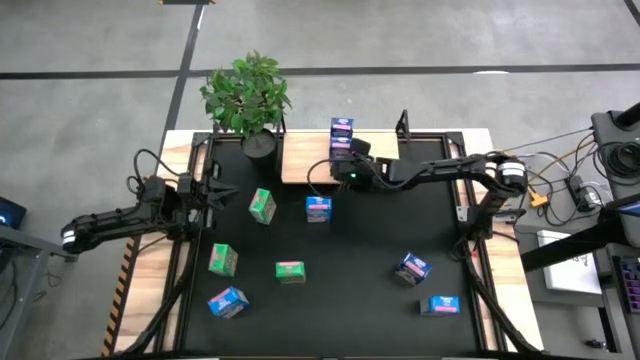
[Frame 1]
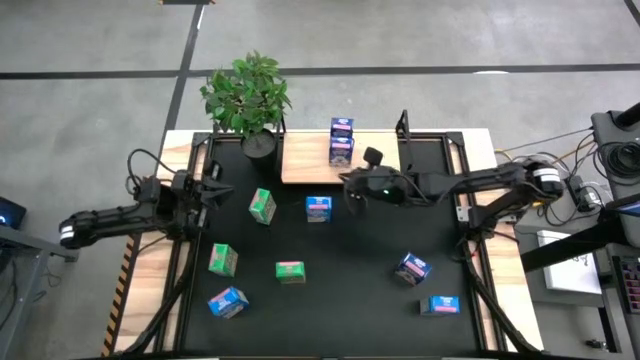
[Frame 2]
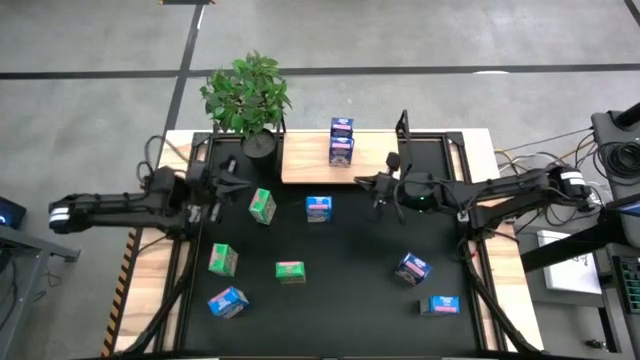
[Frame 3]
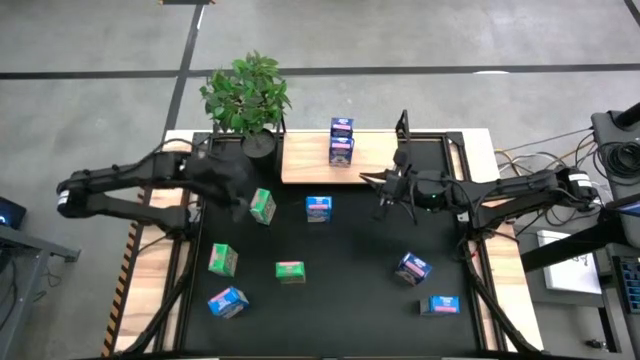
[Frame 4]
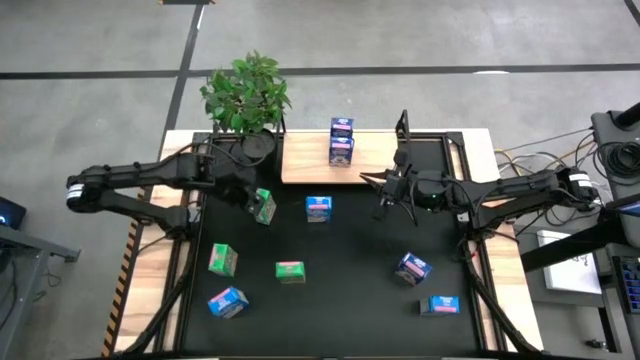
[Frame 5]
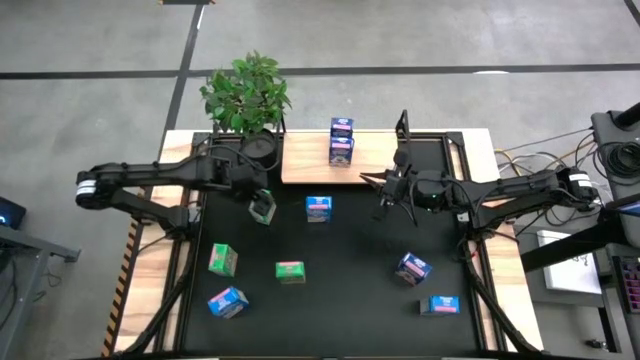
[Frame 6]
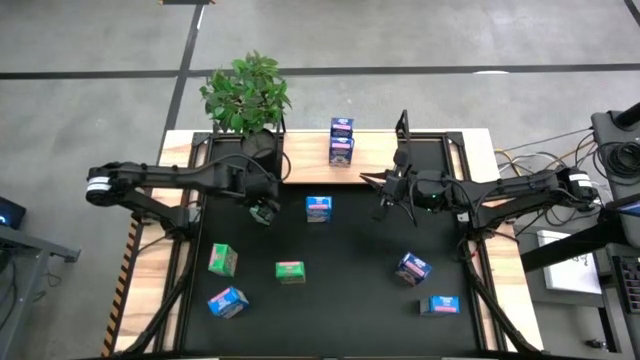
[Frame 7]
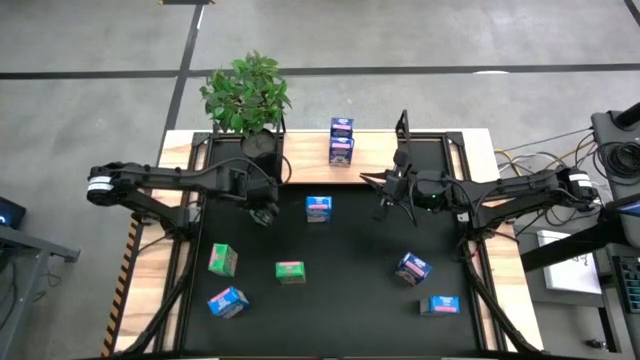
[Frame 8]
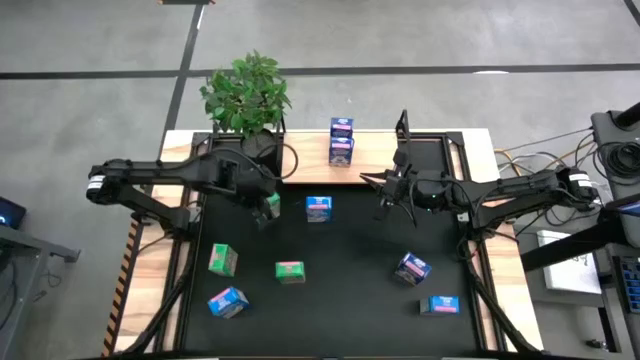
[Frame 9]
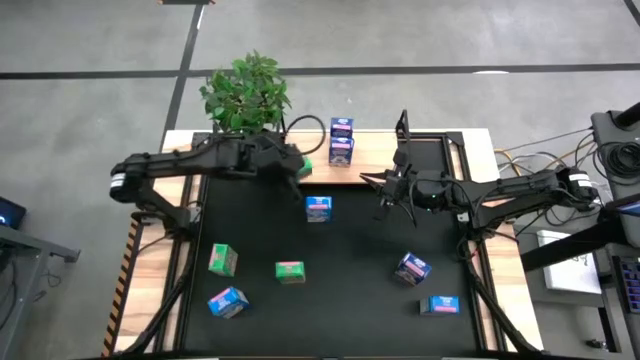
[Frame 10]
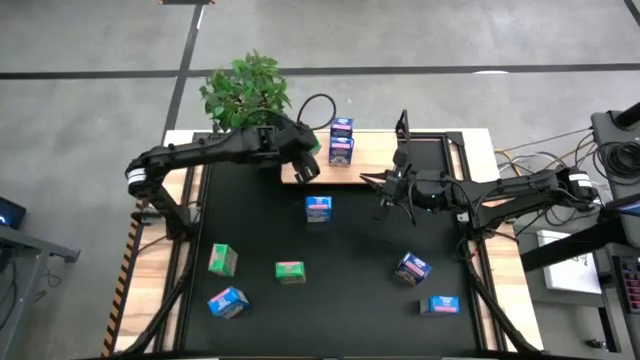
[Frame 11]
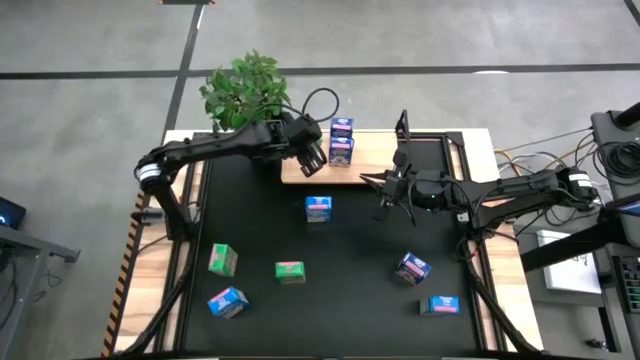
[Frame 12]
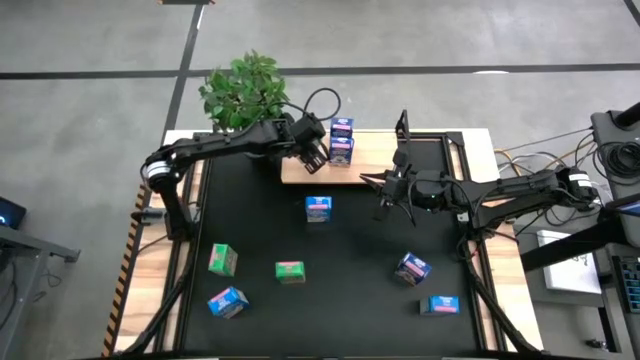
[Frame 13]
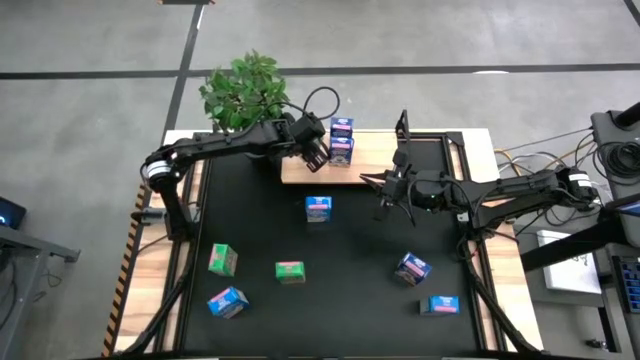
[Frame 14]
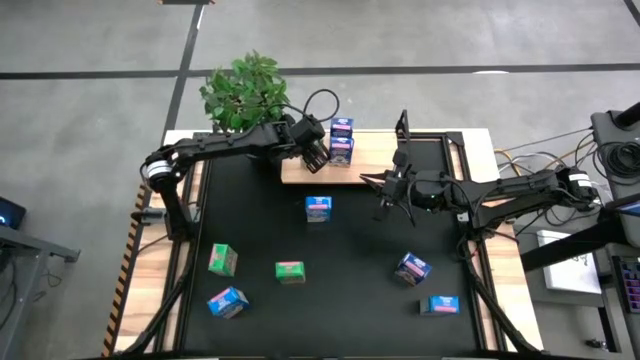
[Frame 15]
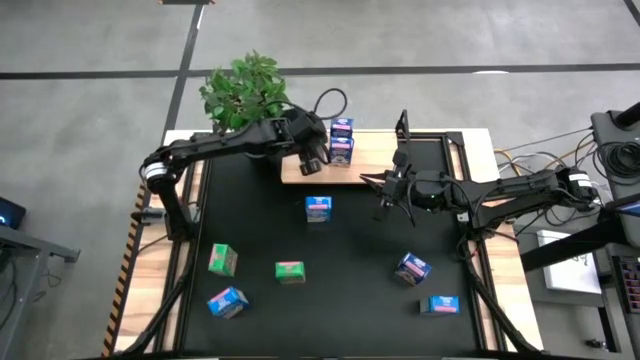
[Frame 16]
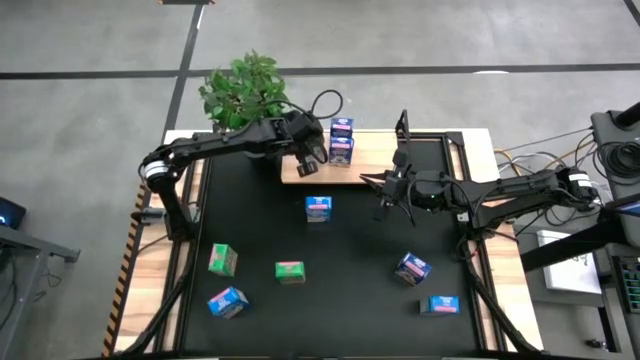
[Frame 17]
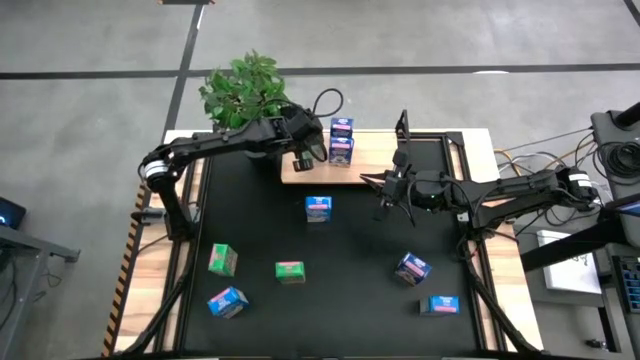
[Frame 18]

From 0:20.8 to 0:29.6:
Task: Stack cereal on shelf
Put the top green cereal box on the shelf

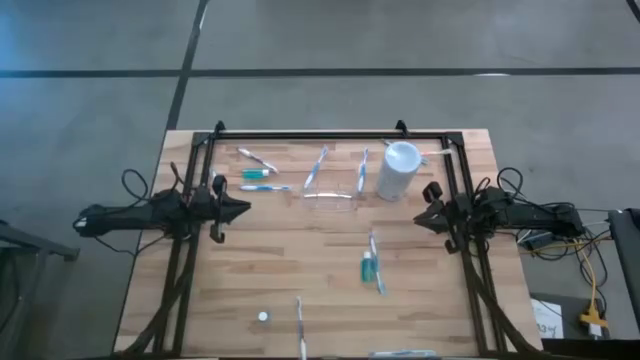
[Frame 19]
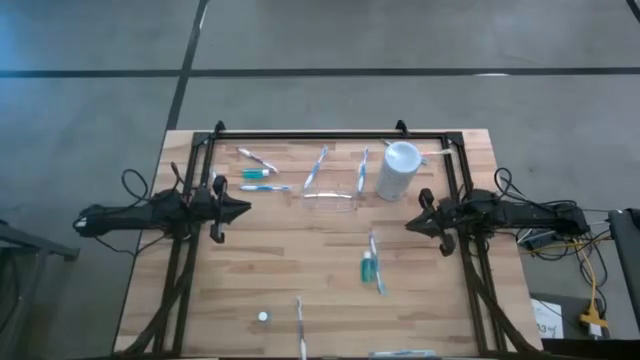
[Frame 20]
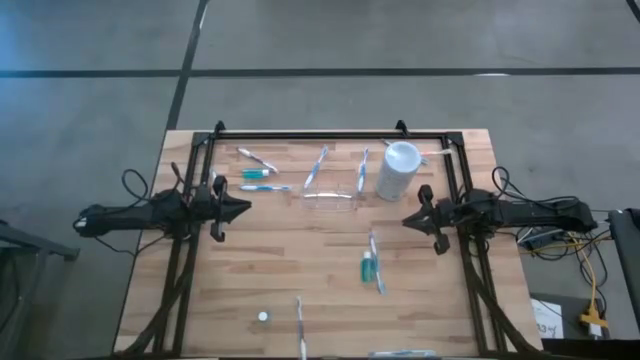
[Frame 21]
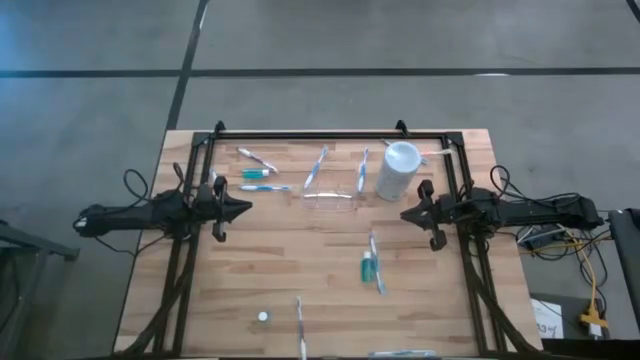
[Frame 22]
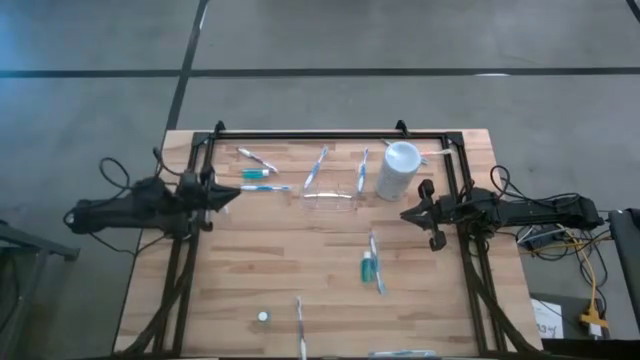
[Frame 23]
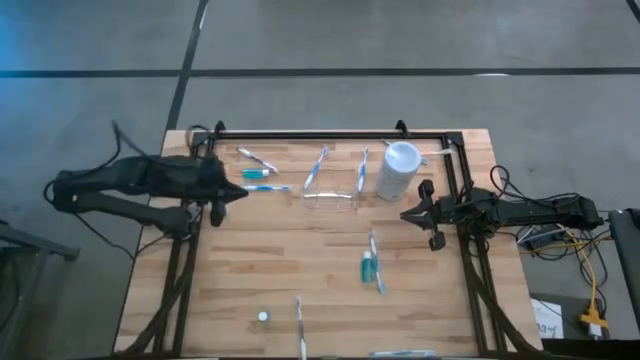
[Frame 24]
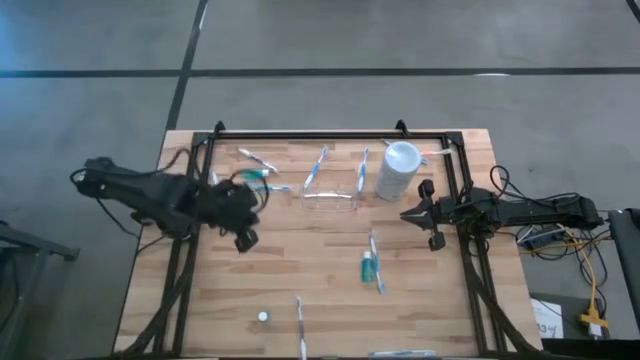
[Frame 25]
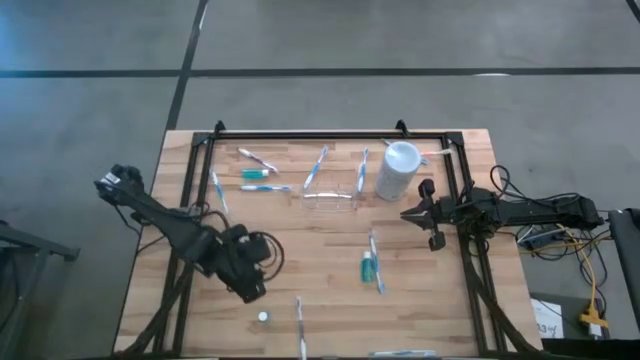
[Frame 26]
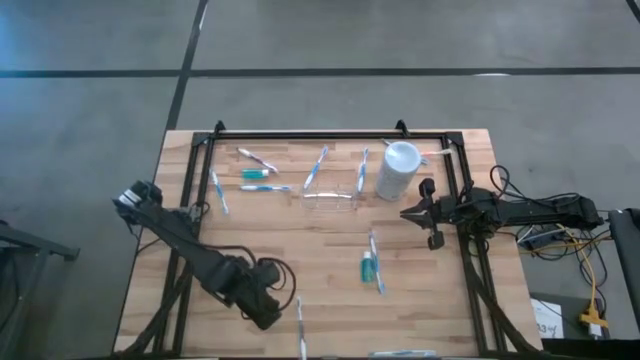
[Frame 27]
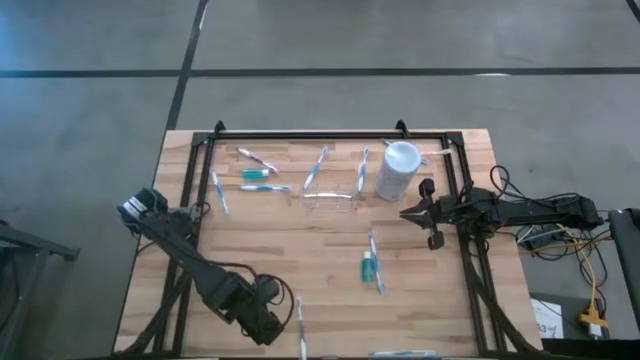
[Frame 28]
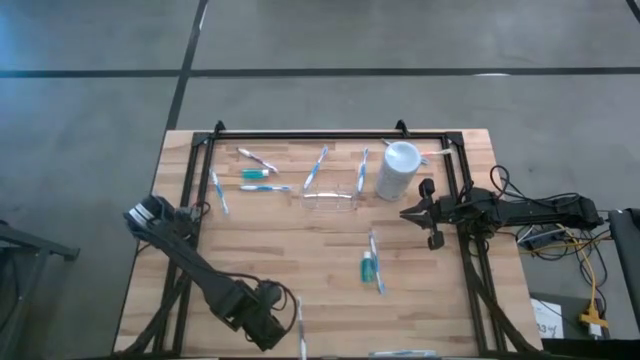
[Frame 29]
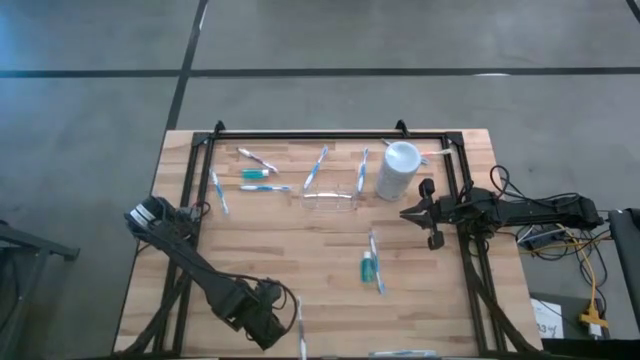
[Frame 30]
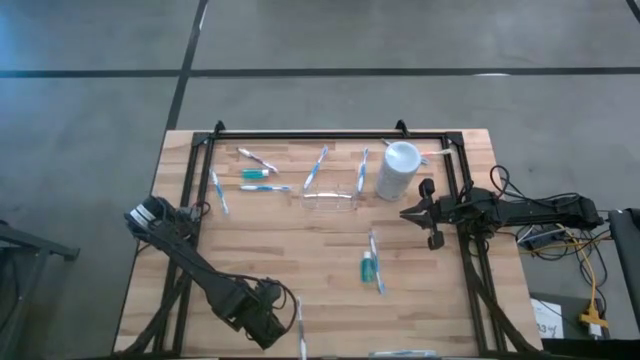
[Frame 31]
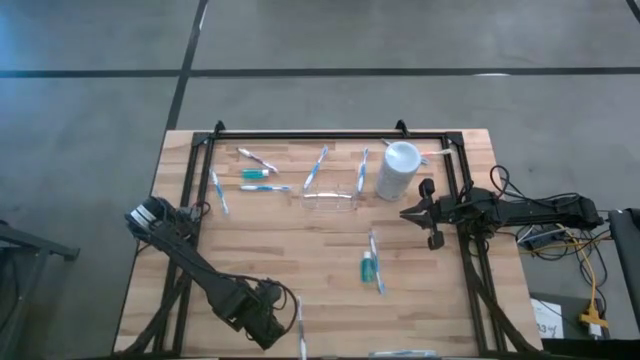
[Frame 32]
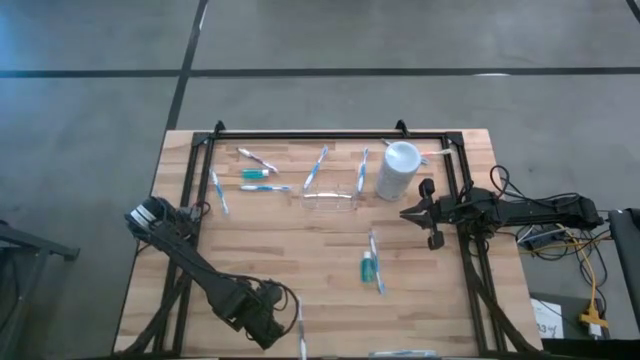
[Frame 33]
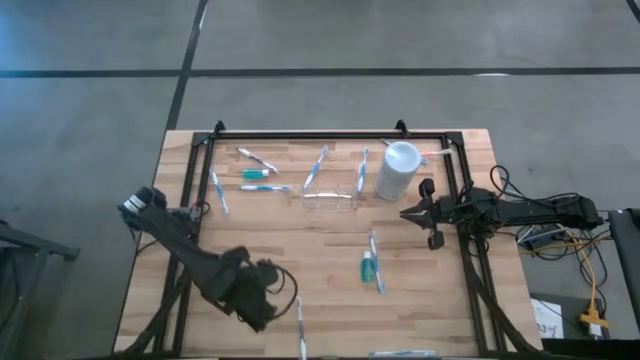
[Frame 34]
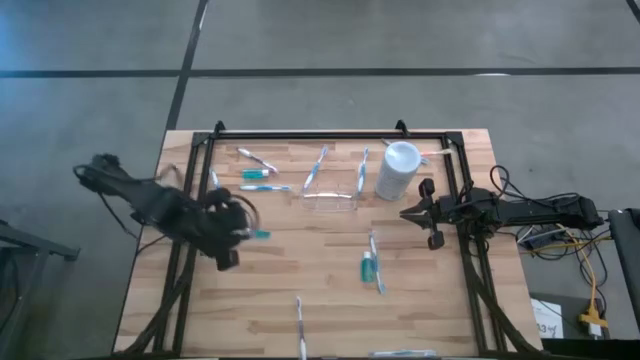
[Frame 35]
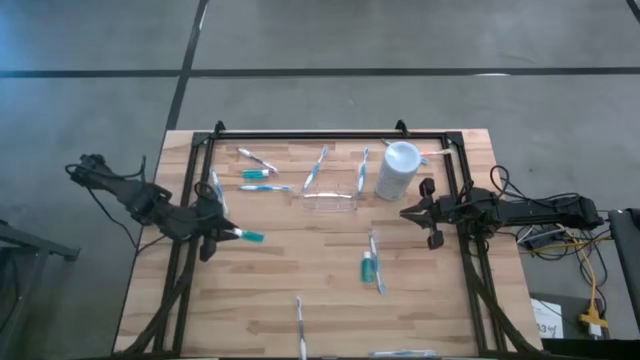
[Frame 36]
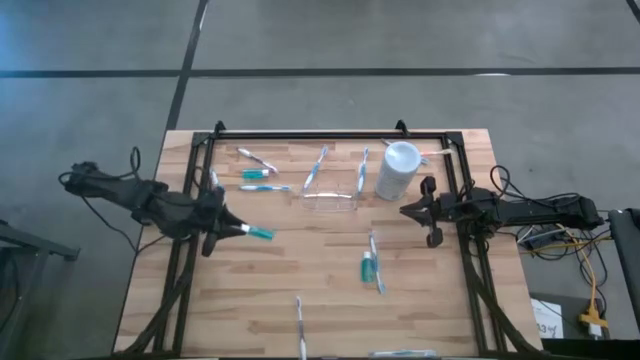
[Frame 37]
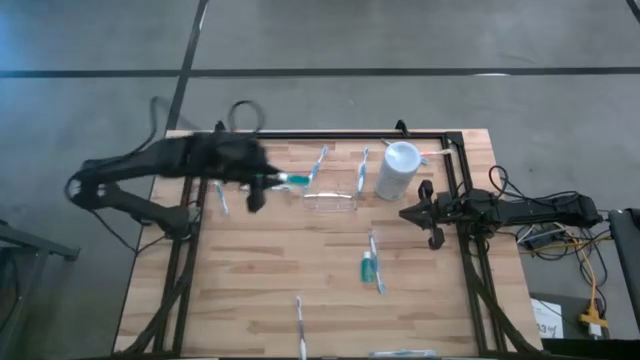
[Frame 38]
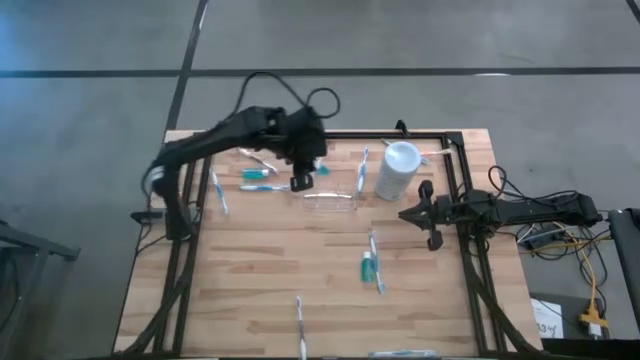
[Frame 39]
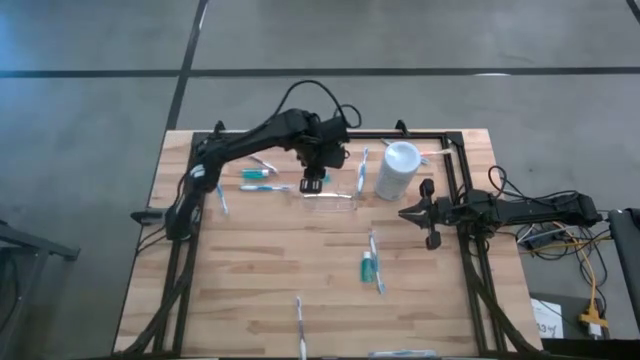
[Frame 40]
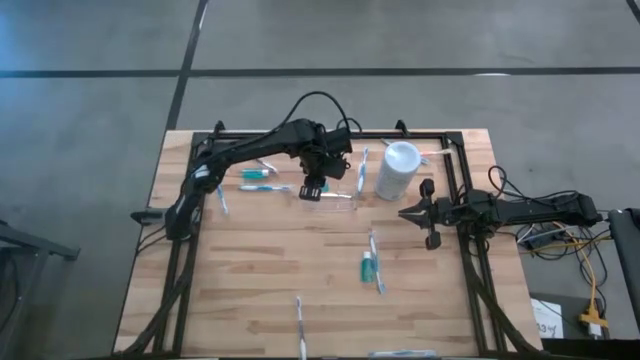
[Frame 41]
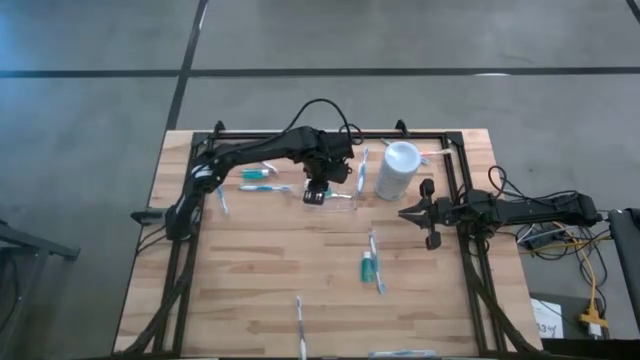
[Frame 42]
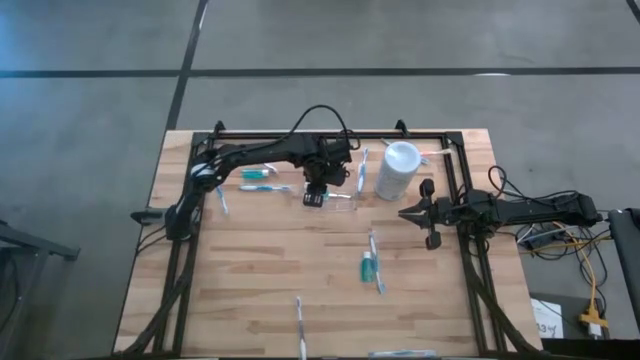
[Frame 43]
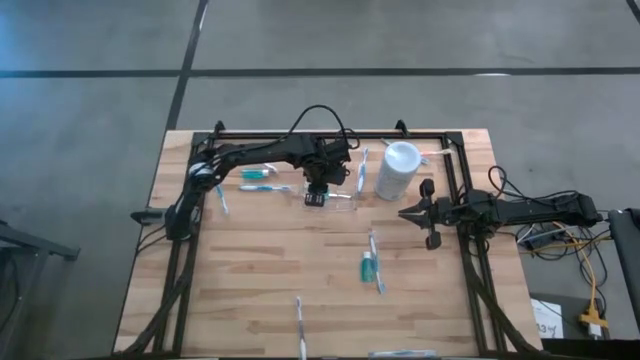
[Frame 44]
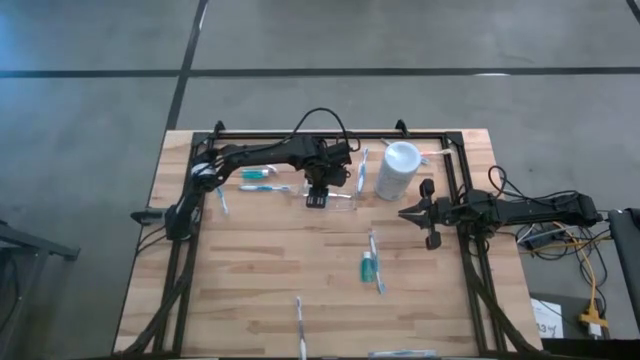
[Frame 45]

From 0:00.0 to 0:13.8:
Task: Pick & Place toothbrushing station
Put the mouthwash into the transparent organizer
